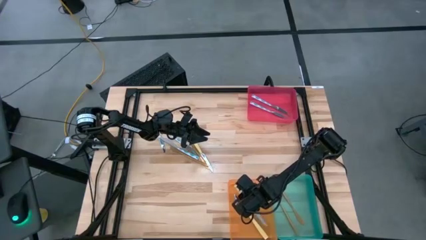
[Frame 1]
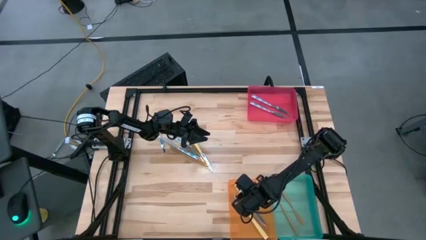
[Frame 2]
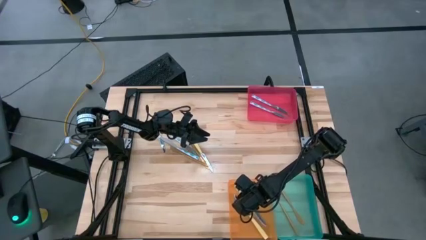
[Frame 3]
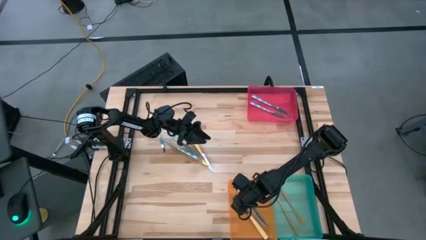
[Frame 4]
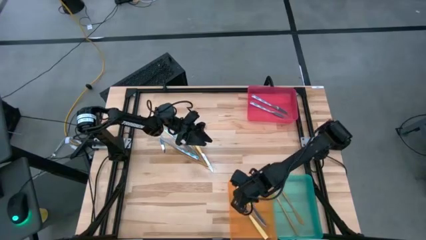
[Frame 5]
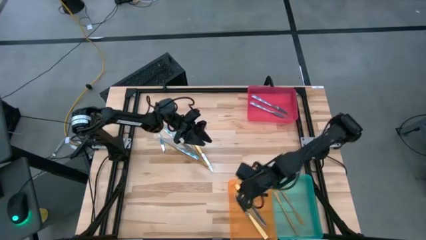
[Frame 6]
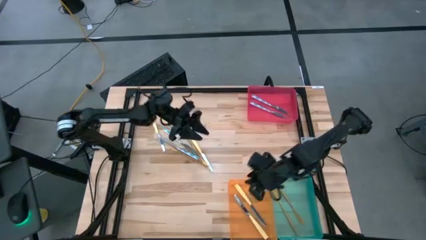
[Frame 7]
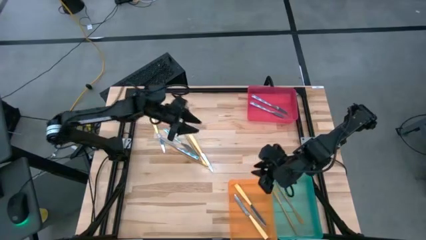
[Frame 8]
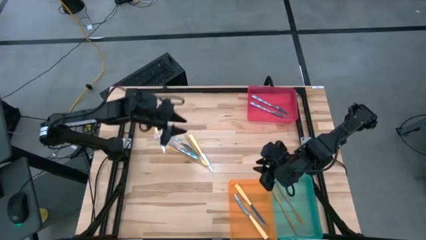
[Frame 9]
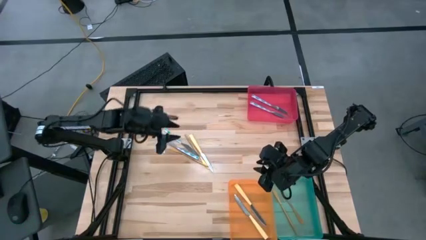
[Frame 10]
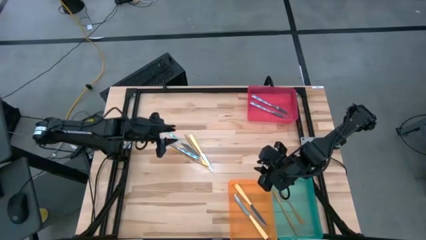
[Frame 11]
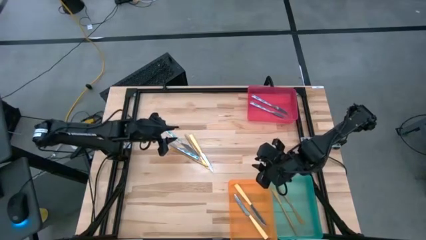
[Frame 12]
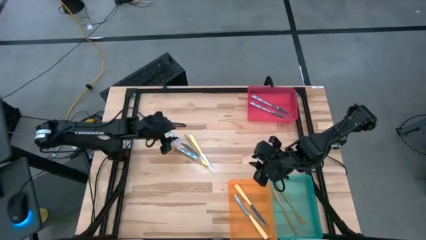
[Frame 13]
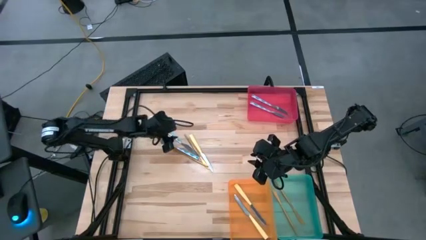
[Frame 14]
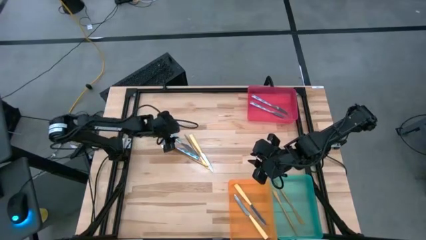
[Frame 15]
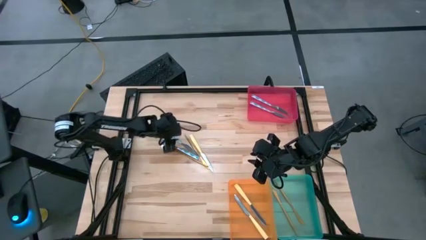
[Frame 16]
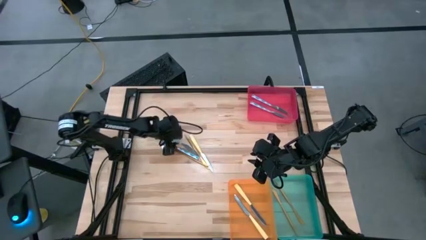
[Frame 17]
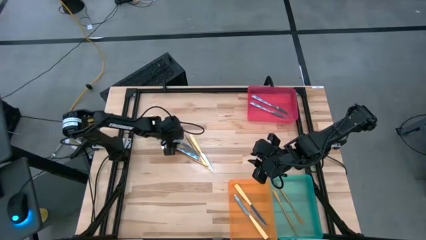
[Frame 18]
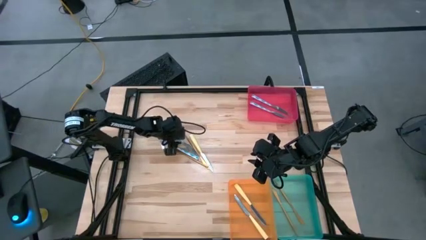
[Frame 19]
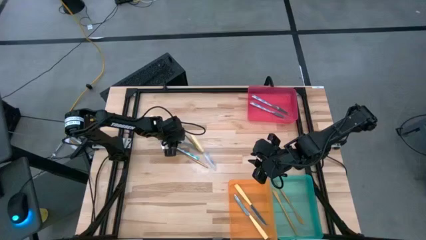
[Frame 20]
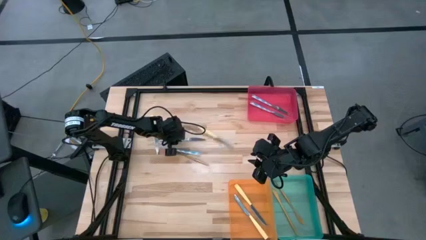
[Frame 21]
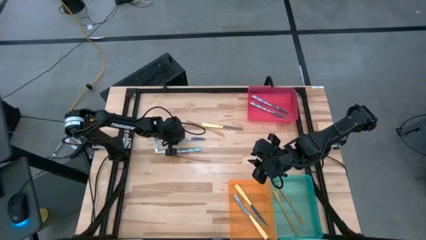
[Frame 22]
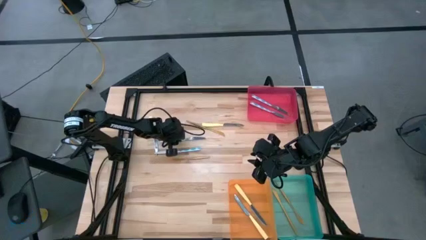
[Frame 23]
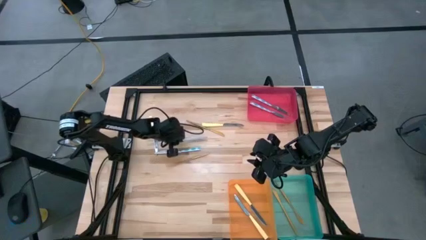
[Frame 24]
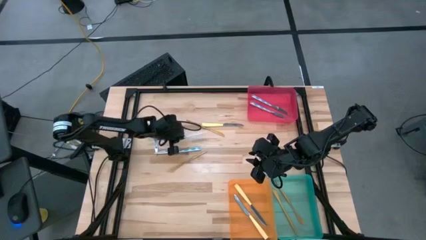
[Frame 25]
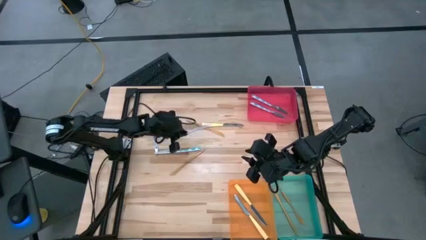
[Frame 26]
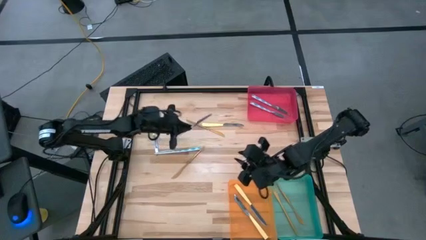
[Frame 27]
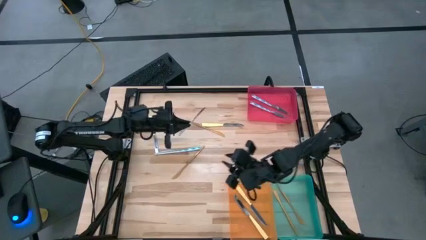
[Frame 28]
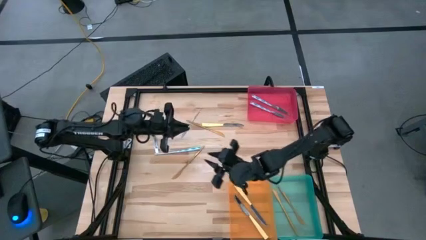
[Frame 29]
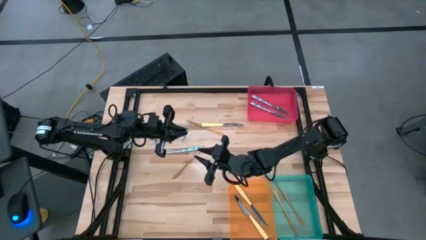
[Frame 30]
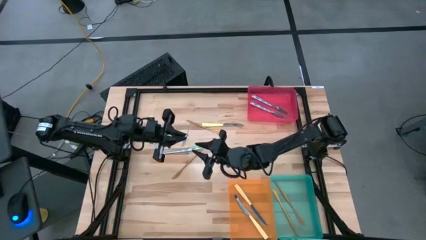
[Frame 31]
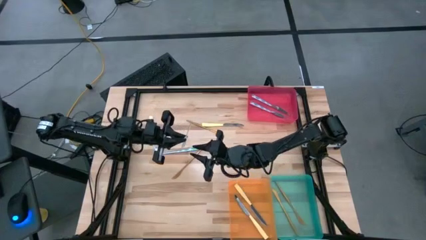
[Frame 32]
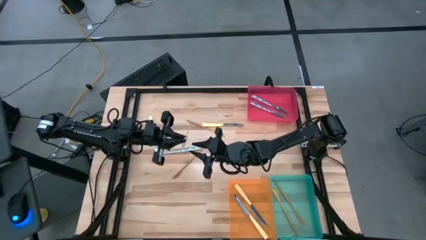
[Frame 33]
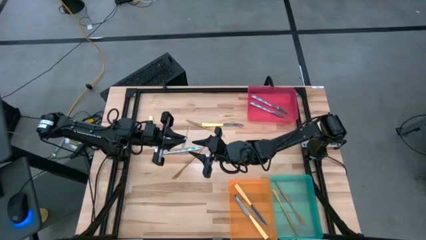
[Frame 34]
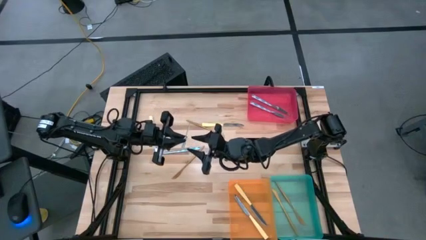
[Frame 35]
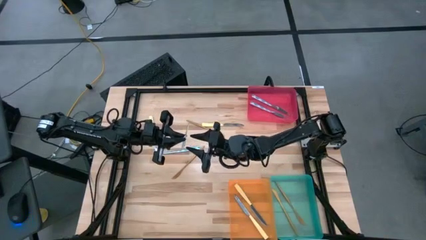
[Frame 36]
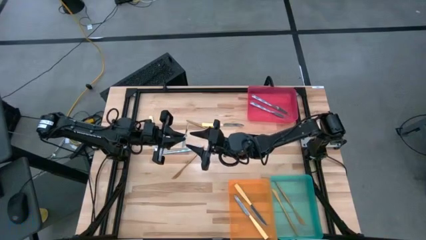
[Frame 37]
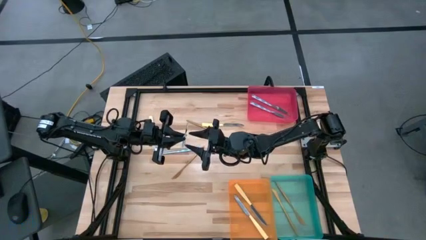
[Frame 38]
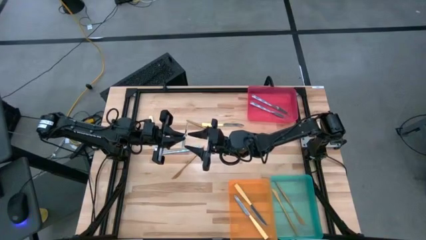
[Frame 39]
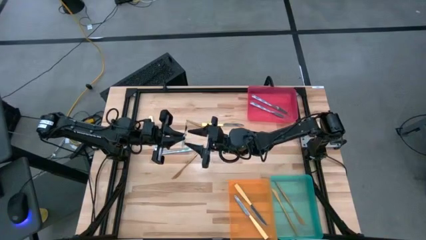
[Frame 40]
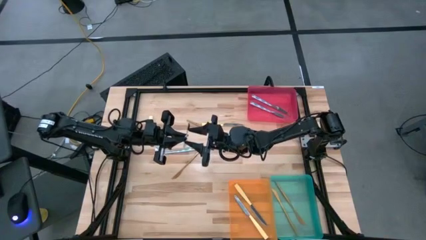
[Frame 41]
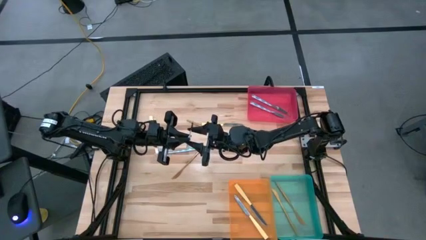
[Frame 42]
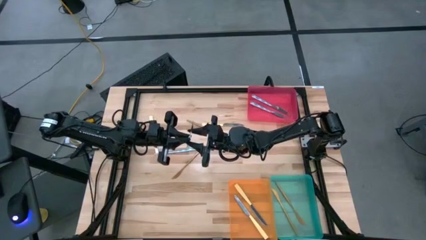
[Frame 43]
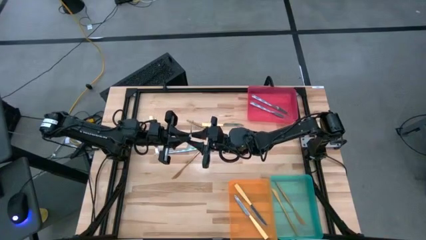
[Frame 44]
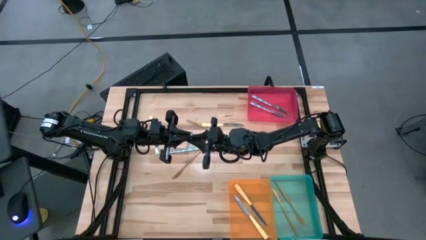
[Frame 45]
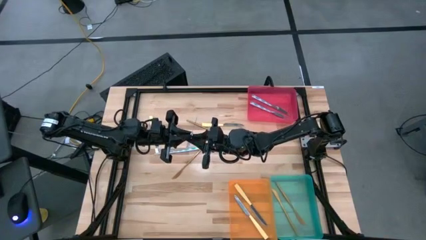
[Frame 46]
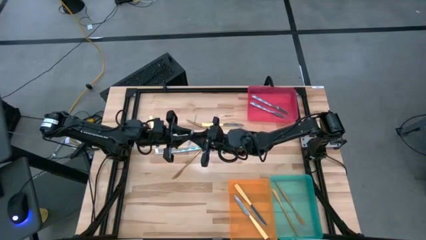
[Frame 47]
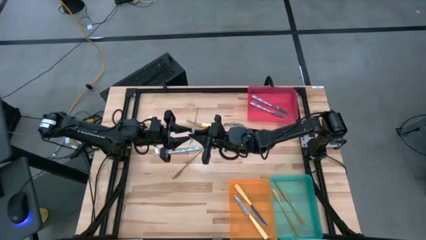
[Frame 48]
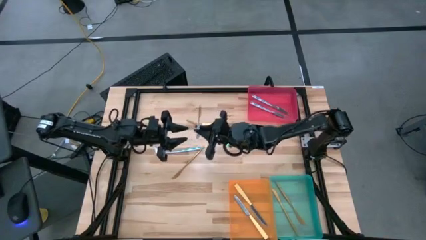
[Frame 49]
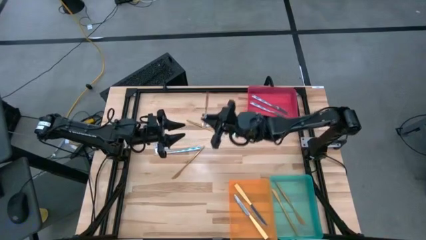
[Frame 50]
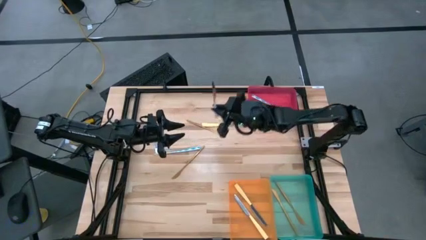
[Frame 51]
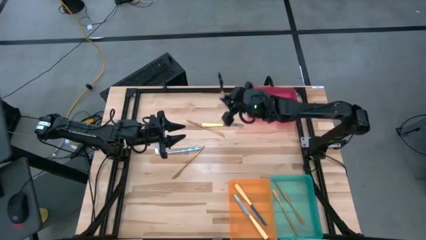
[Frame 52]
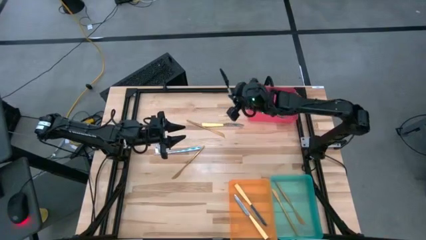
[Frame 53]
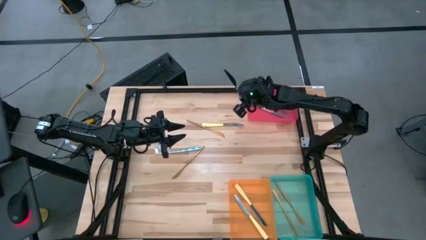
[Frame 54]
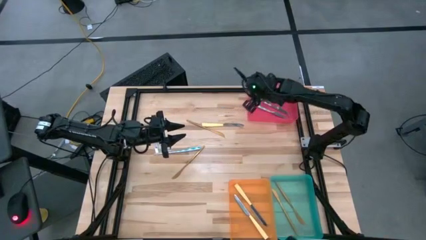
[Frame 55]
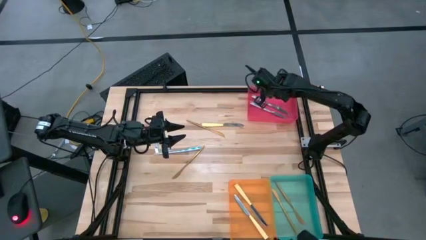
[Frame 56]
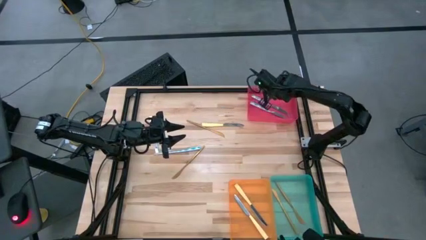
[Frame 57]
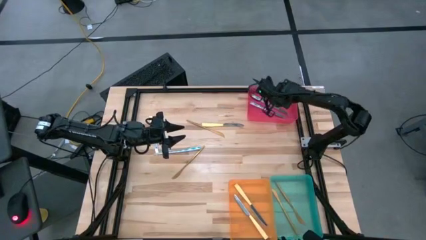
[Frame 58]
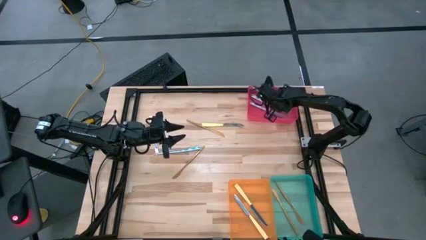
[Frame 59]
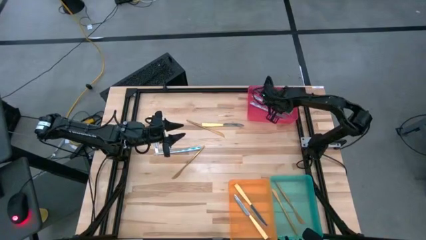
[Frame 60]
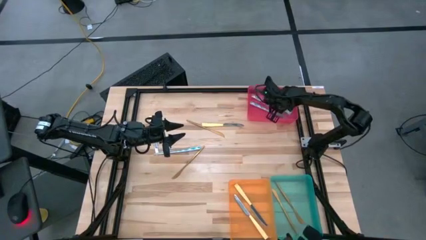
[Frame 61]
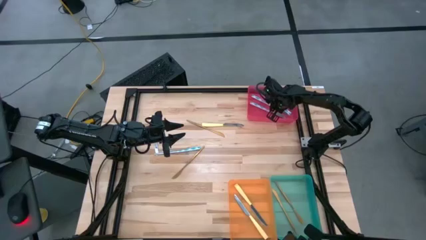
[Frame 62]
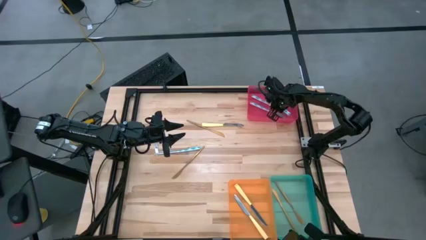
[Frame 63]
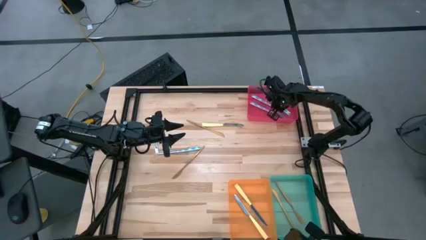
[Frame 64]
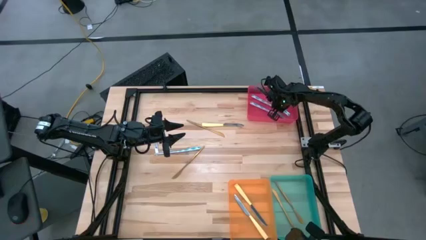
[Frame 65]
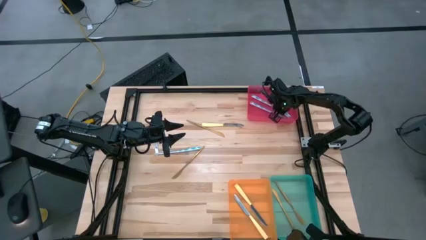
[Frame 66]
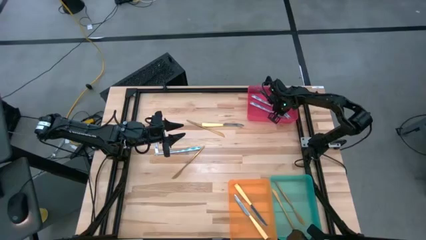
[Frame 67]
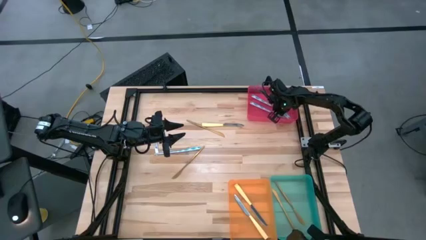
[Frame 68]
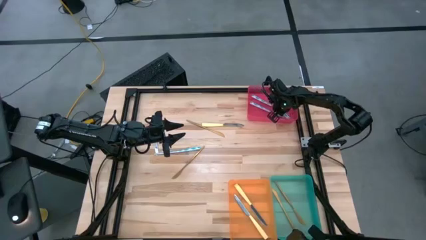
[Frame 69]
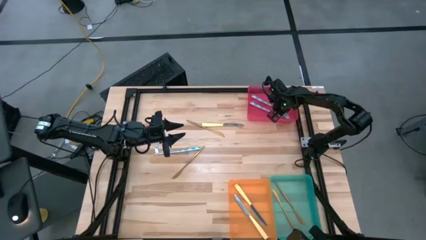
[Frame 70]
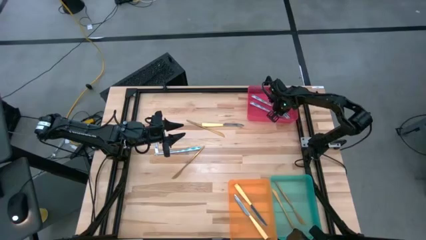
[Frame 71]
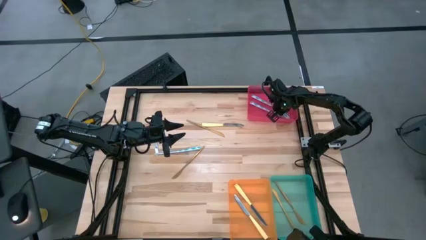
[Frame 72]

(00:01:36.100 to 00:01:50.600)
Task: Sort silverware by color (type)
Put the blue patterned knife into the red bin
